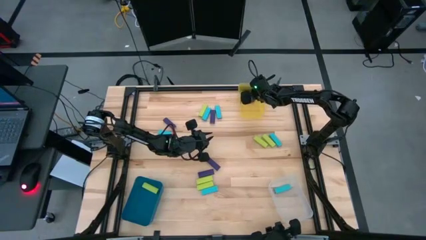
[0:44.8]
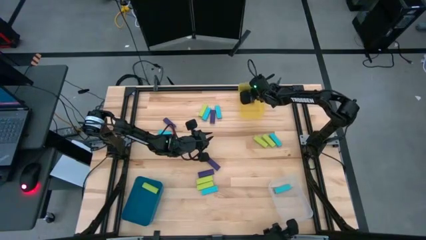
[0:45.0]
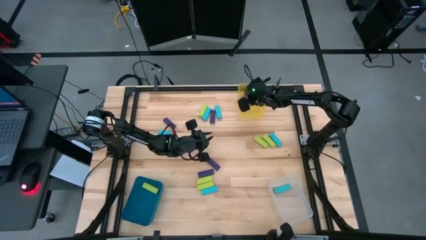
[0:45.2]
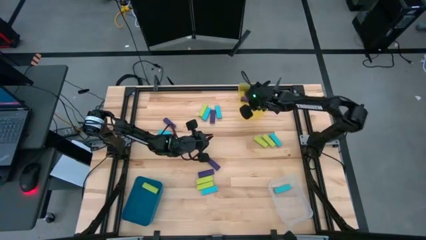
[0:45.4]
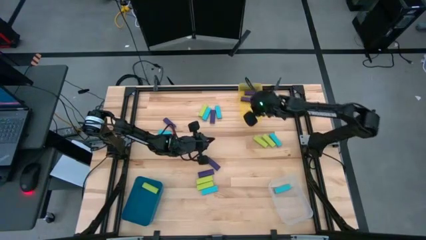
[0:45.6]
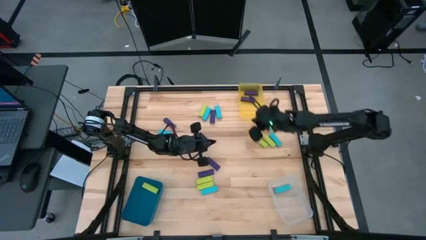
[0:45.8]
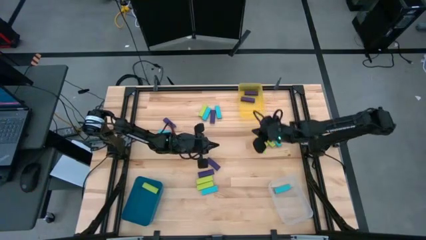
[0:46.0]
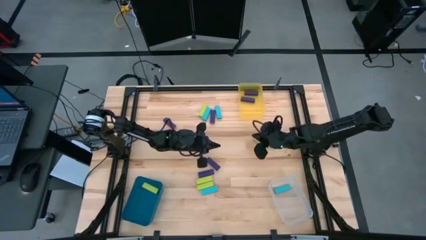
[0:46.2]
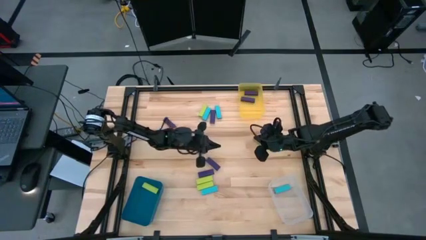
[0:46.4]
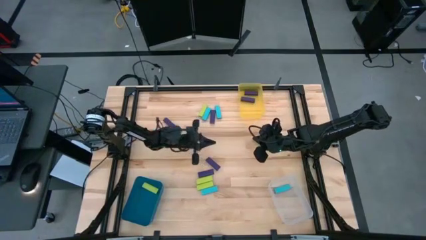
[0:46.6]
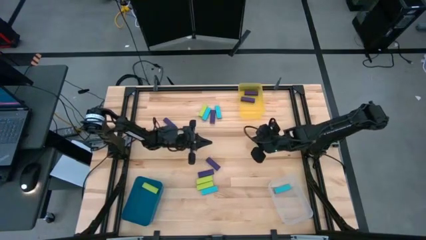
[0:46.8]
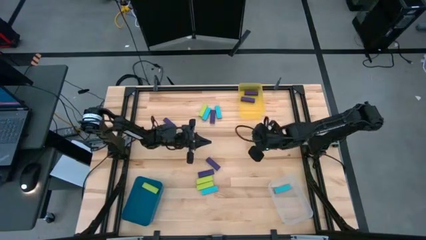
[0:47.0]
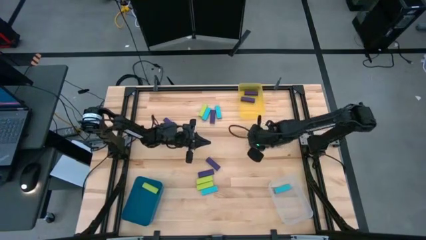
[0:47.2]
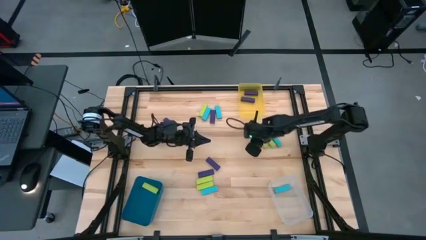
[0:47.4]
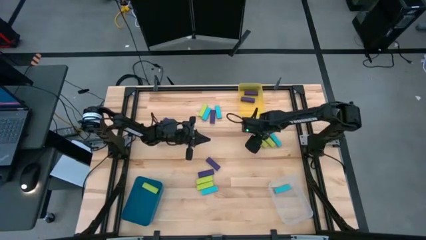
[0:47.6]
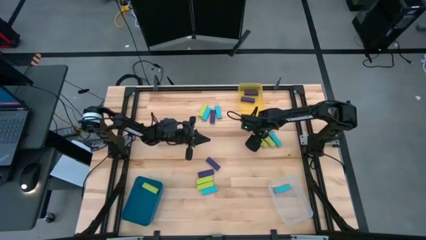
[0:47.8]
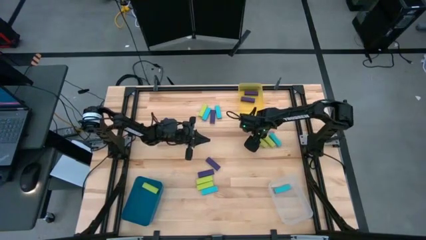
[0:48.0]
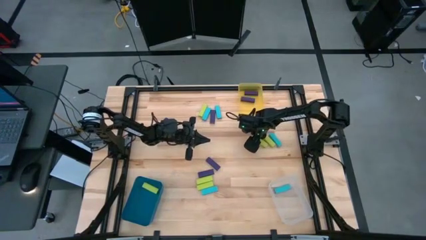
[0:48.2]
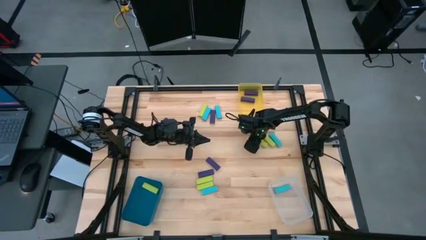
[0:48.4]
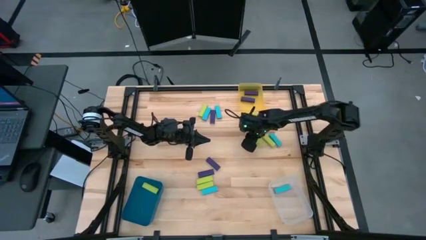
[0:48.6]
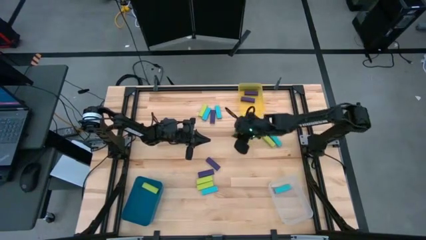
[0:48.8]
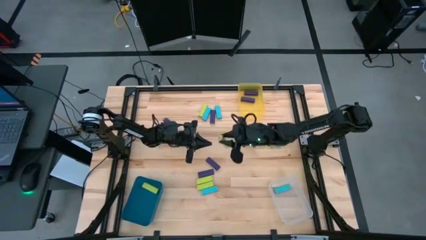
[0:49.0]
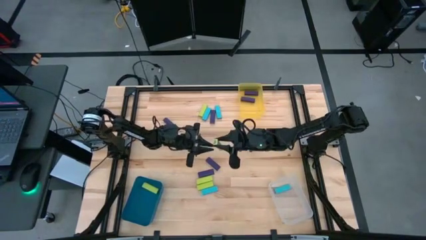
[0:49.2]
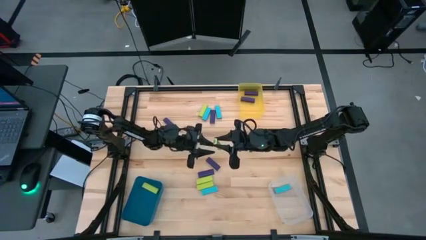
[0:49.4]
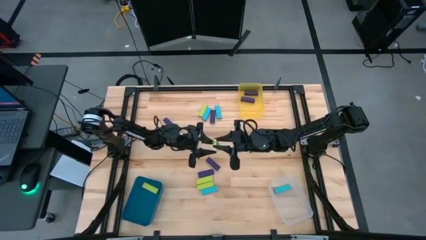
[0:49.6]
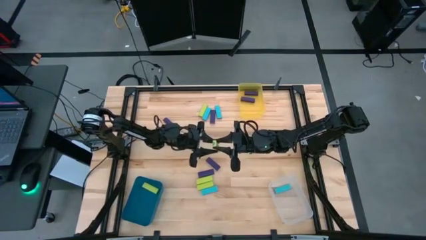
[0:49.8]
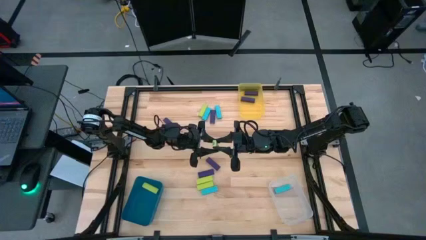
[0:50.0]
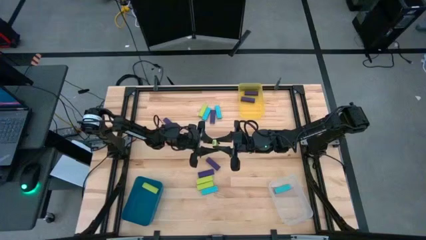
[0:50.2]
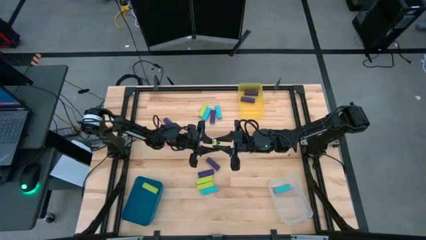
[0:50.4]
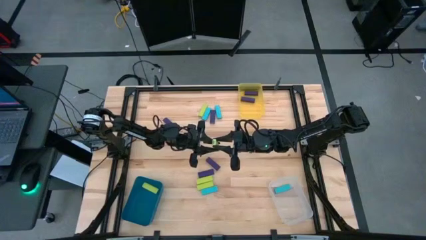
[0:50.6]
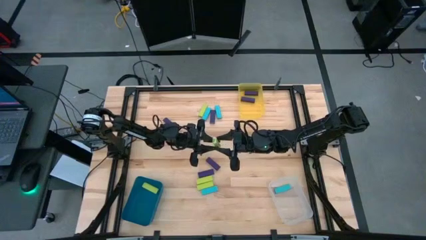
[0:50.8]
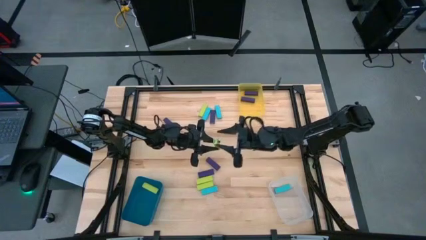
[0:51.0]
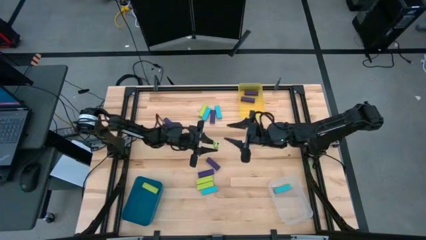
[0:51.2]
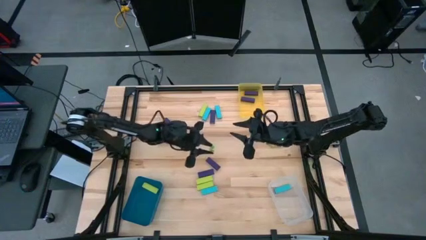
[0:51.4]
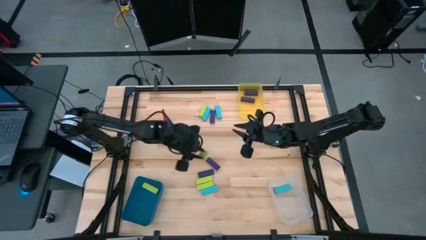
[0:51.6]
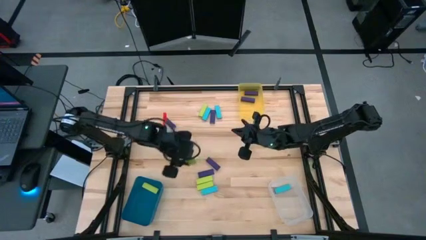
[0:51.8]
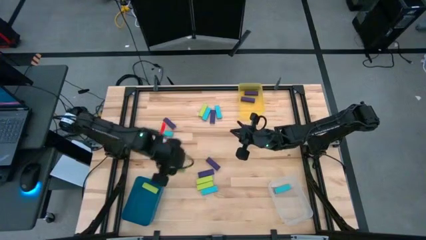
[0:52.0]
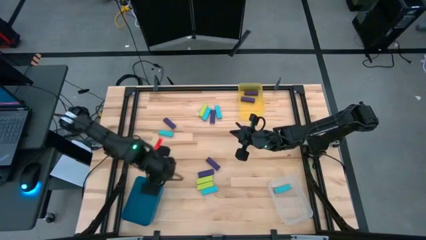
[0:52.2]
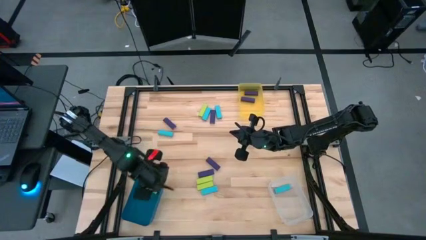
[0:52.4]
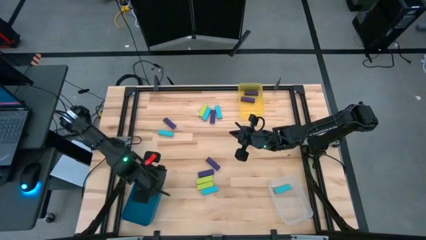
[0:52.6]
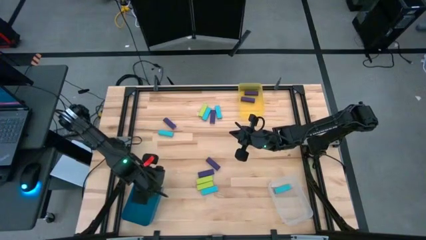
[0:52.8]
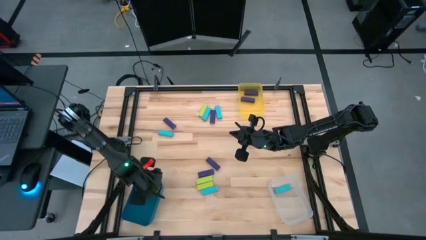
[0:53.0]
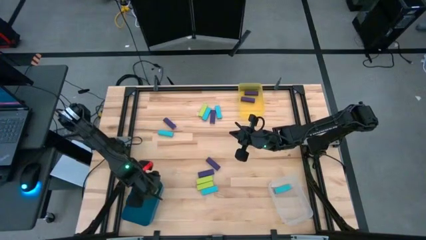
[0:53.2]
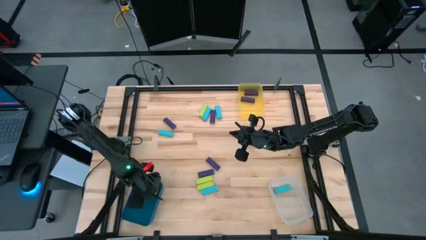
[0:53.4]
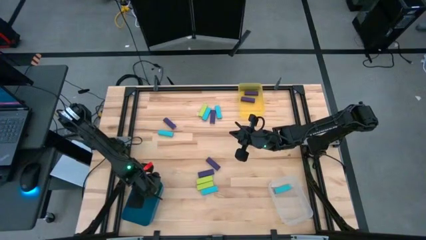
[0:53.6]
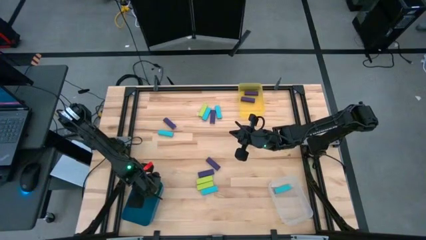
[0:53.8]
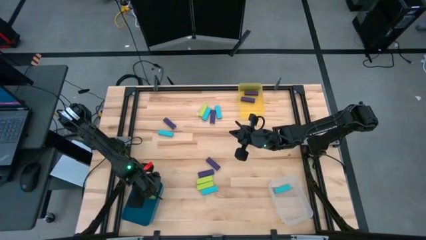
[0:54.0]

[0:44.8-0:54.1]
Task: Sort blocks
Put the green block into the blue bin

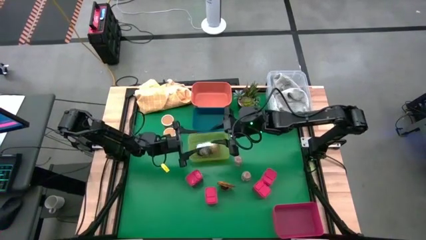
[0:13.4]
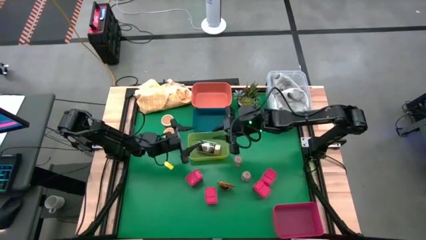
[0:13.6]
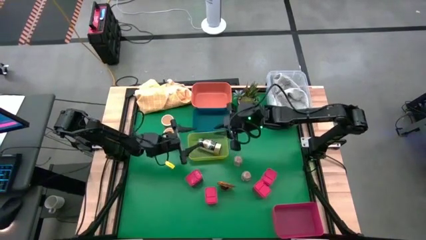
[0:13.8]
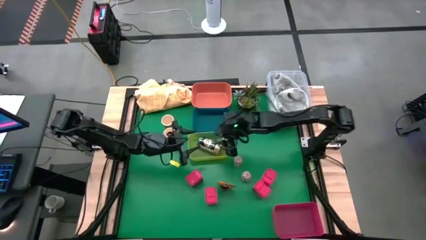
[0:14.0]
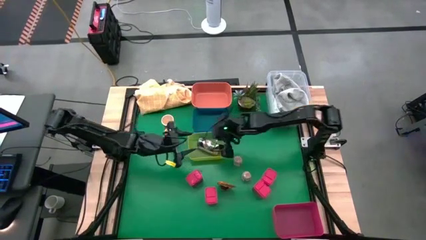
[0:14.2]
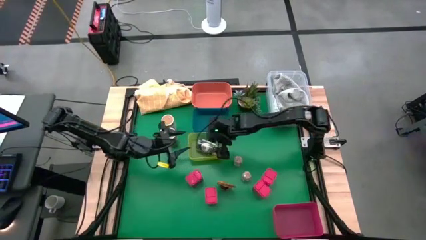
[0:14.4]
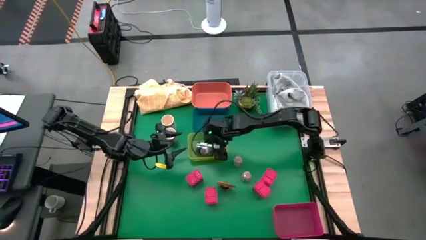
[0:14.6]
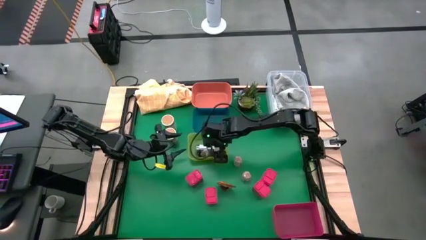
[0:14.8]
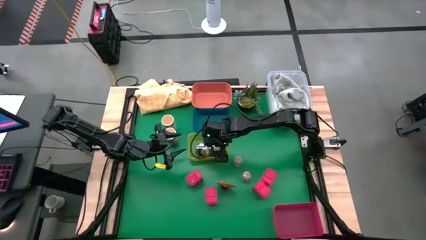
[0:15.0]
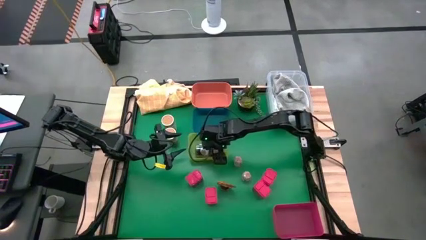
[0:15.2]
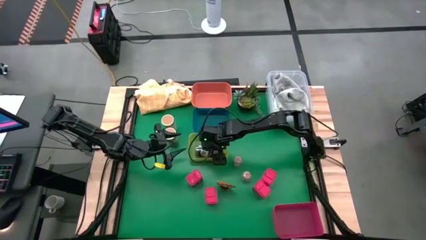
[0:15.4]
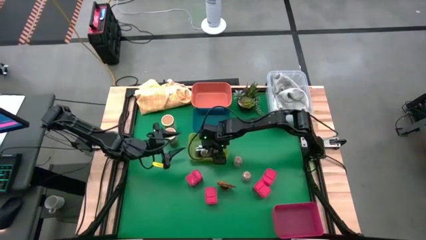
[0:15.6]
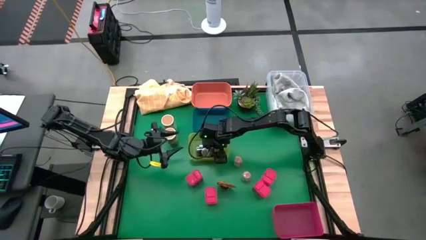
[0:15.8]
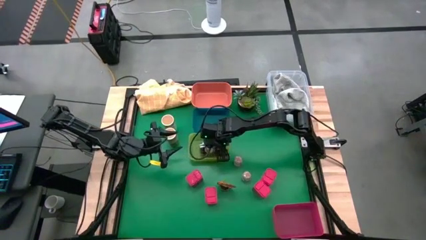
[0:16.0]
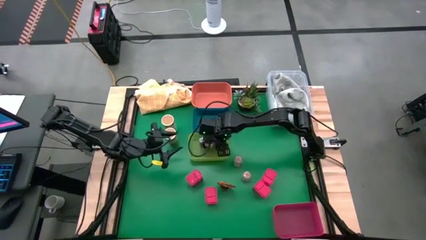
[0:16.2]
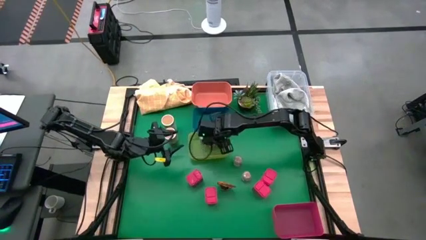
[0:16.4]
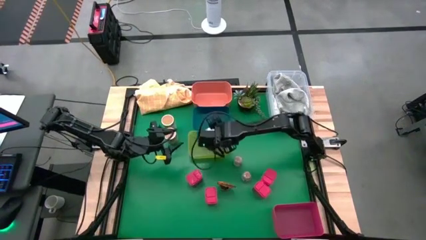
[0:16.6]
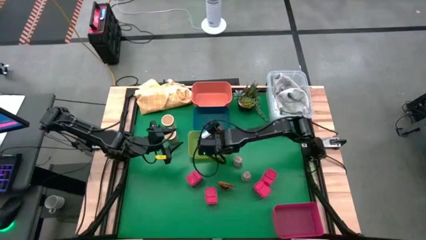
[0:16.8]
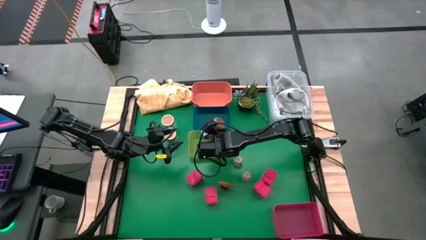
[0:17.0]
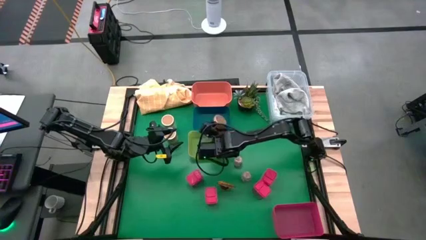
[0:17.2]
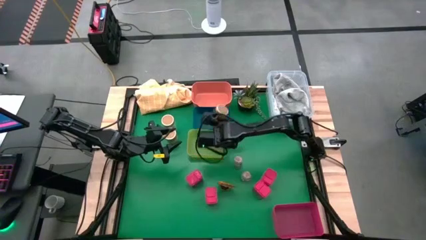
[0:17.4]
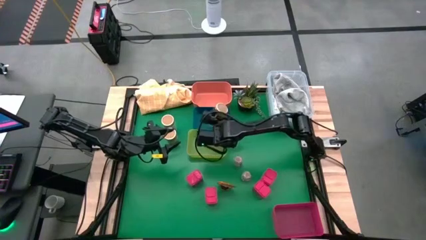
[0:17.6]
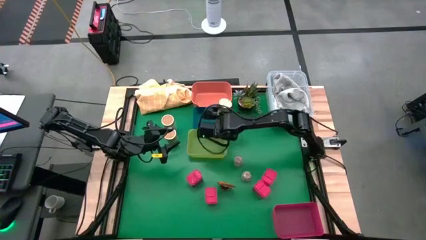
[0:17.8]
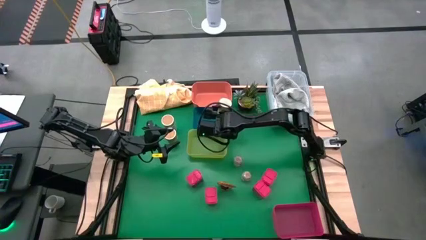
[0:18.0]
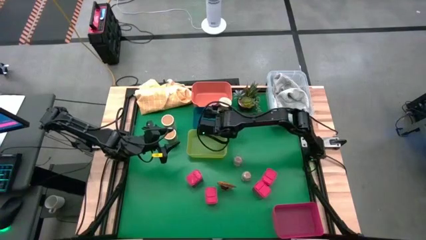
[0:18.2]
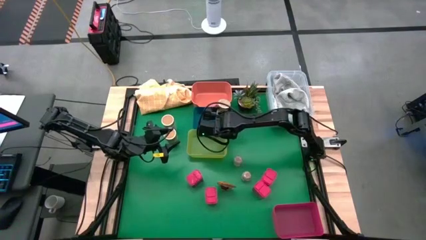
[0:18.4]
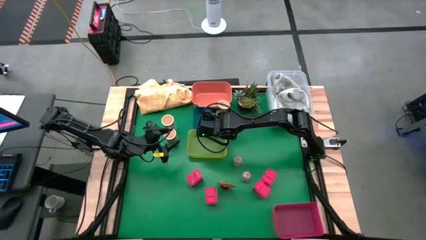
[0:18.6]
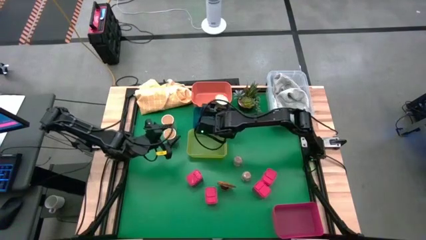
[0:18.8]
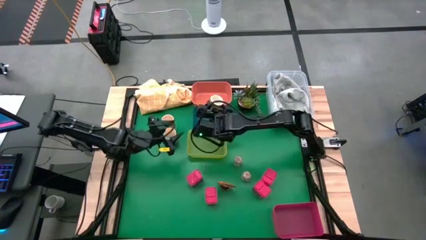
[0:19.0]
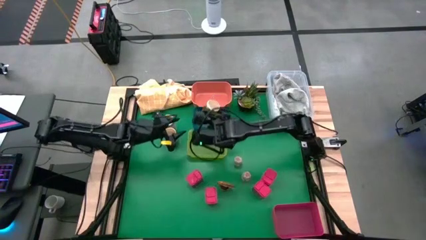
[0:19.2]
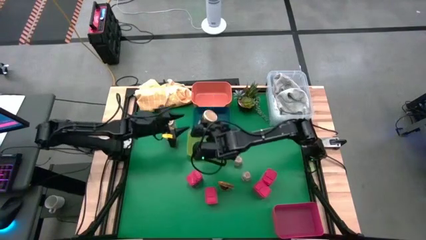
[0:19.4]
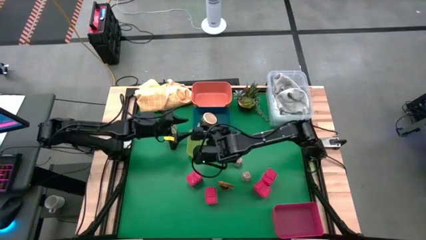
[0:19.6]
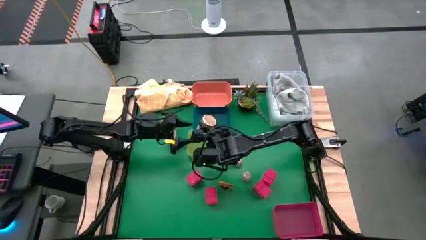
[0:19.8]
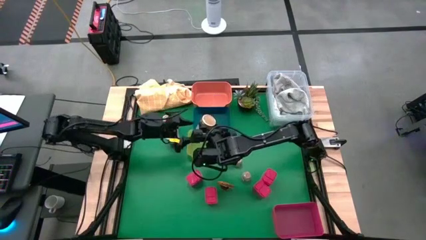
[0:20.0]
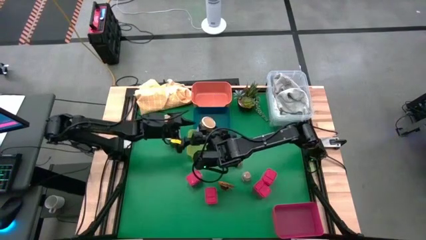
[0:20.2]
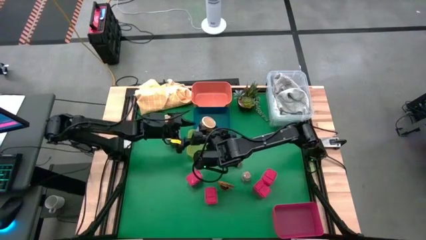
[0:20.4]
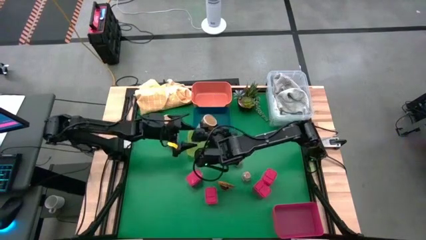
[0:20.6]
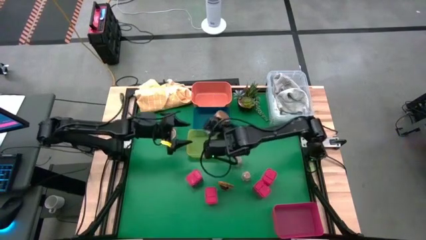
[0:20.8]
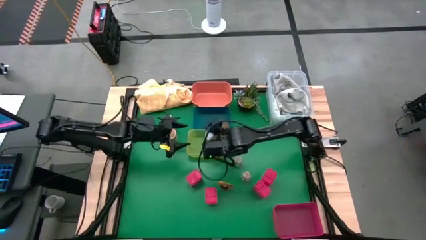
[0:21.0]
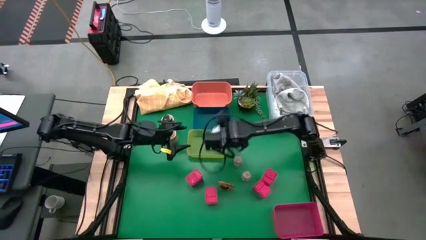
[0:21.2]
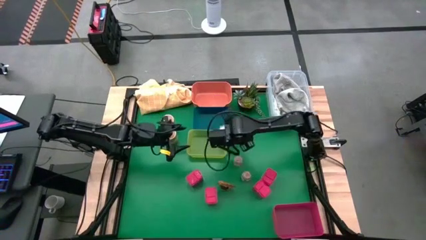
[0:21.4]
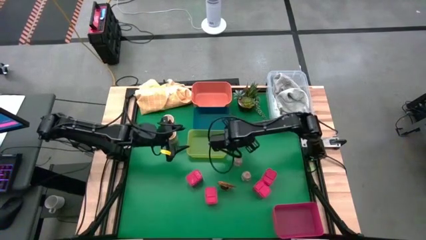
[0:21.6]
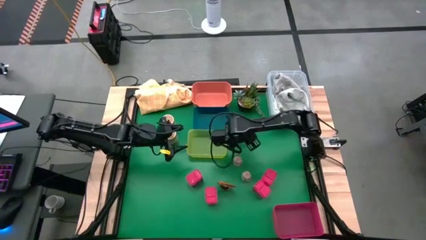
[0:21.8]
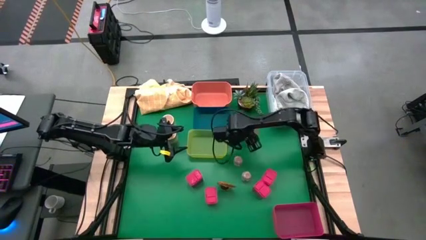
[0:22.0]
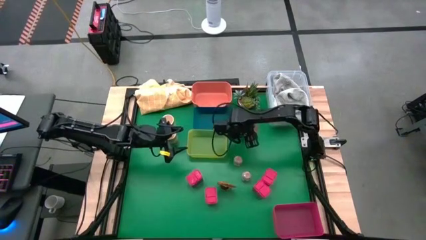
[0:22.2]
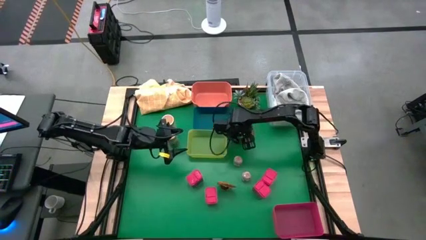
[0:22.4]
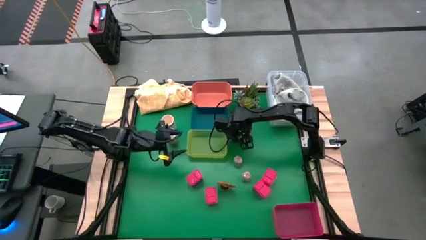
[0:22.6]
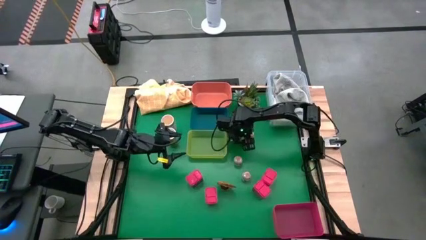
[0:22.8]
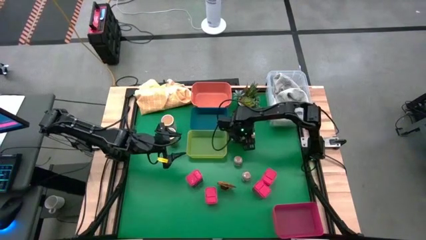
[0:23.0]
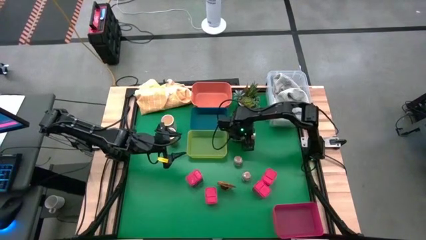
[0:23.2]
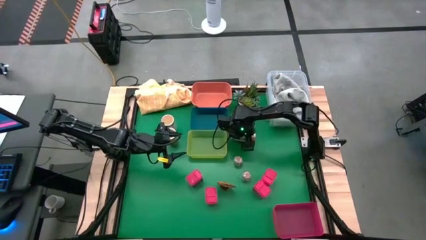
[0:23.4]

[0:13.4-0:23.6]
Task: Sort spices by type
Remove the gold seasoning bottle from the yellow bin
